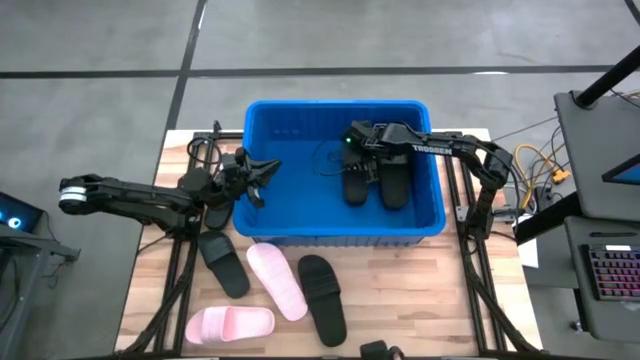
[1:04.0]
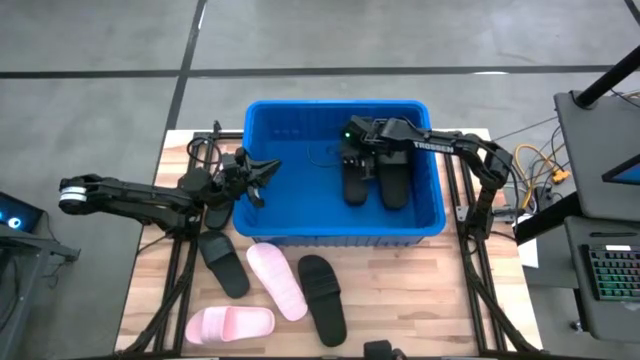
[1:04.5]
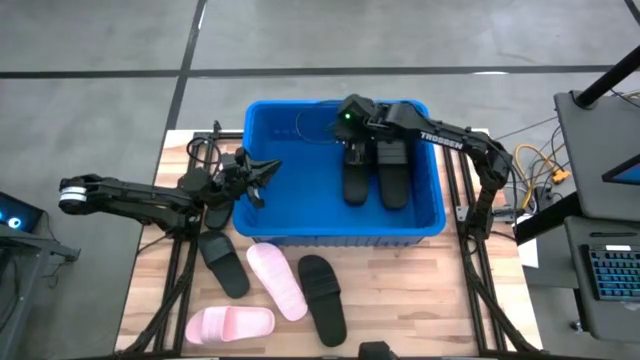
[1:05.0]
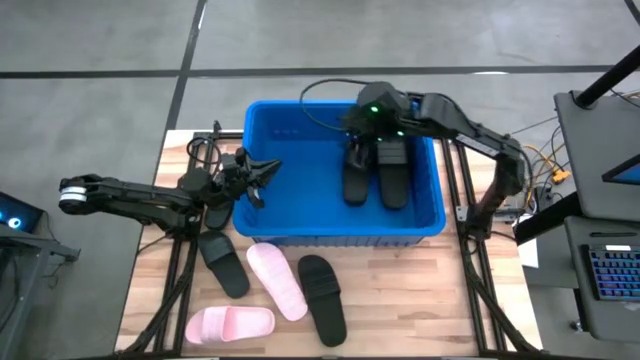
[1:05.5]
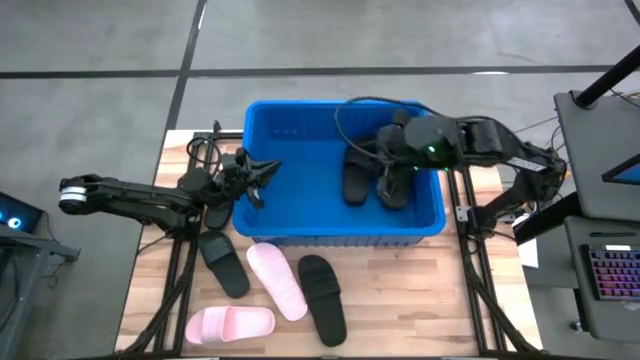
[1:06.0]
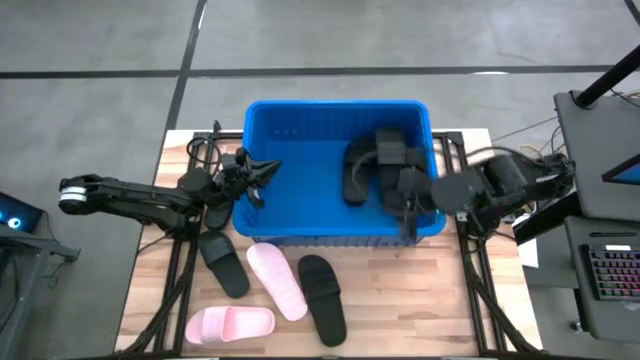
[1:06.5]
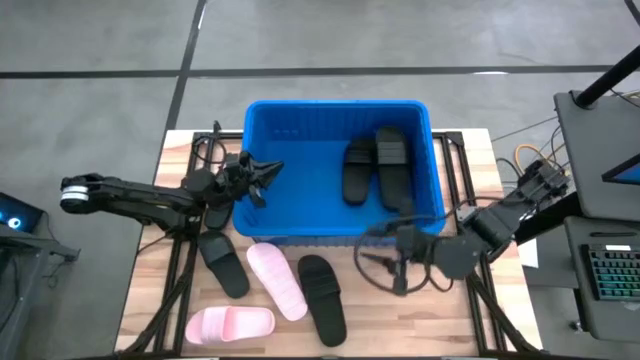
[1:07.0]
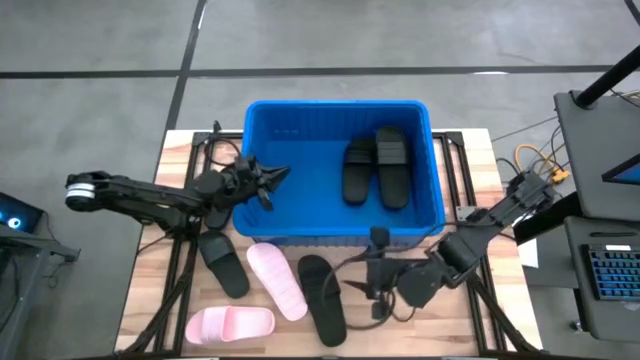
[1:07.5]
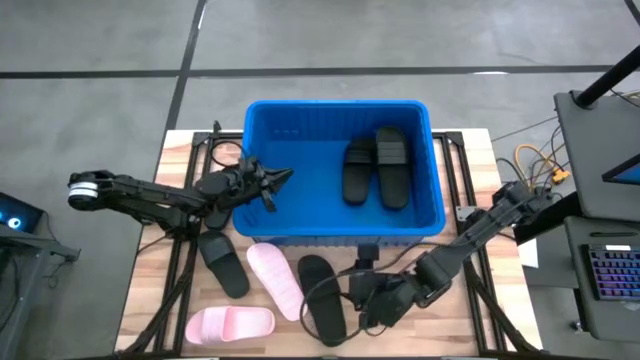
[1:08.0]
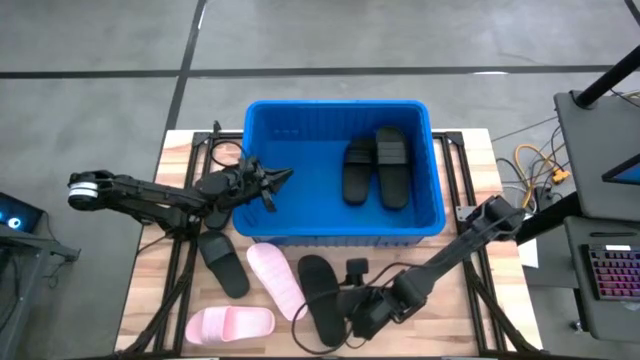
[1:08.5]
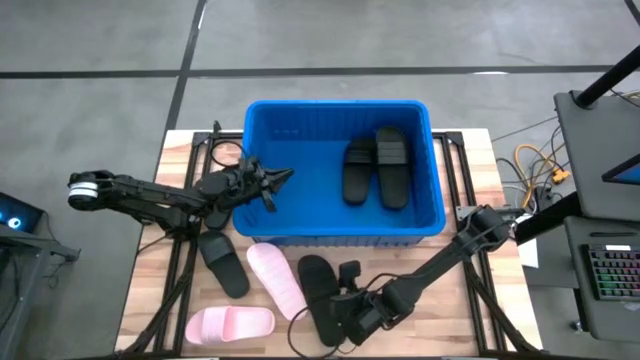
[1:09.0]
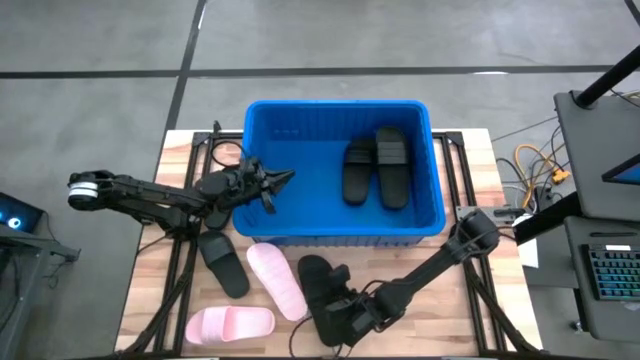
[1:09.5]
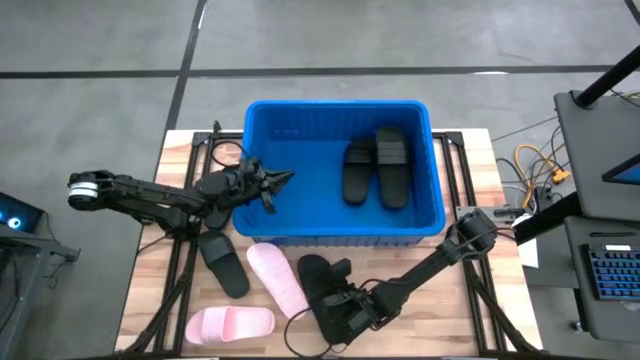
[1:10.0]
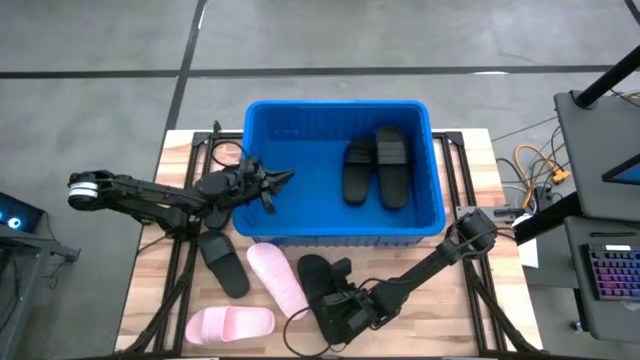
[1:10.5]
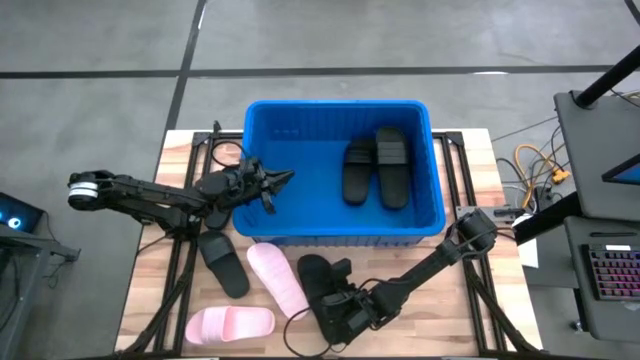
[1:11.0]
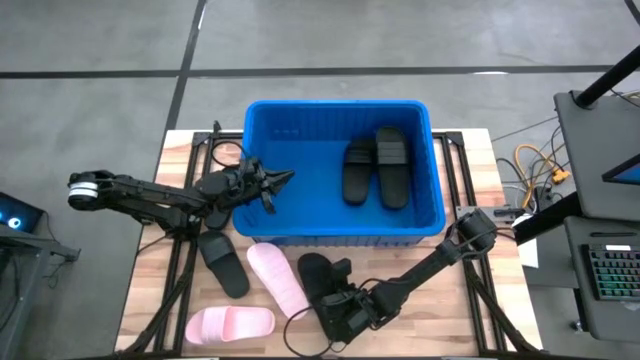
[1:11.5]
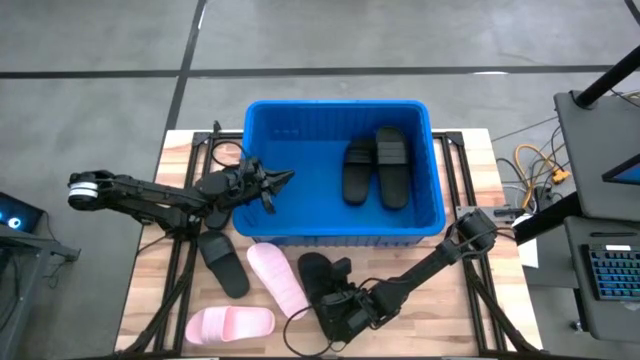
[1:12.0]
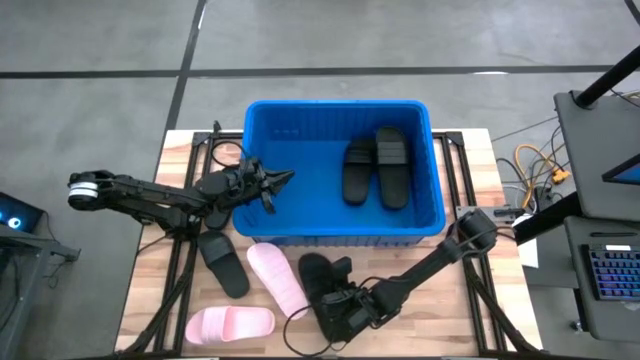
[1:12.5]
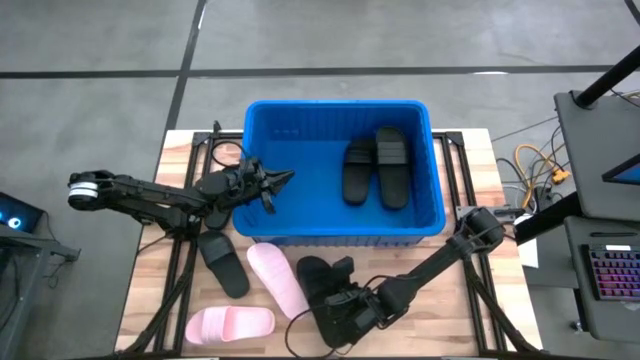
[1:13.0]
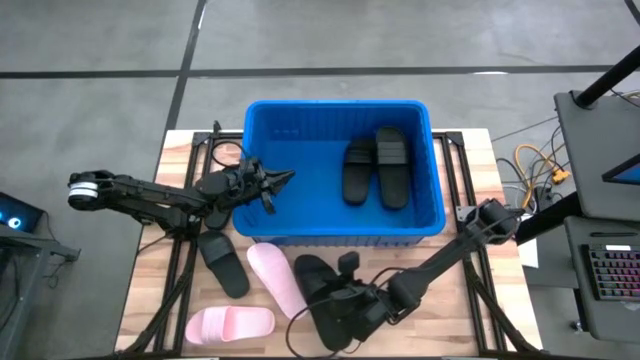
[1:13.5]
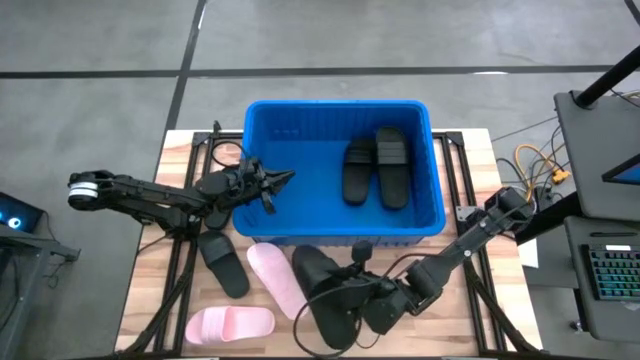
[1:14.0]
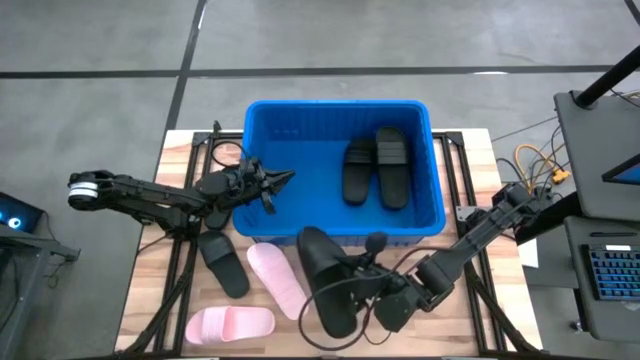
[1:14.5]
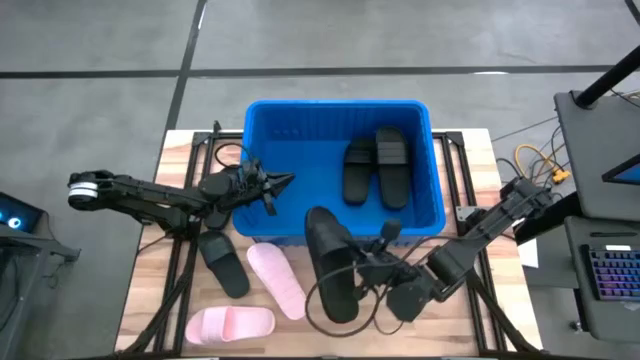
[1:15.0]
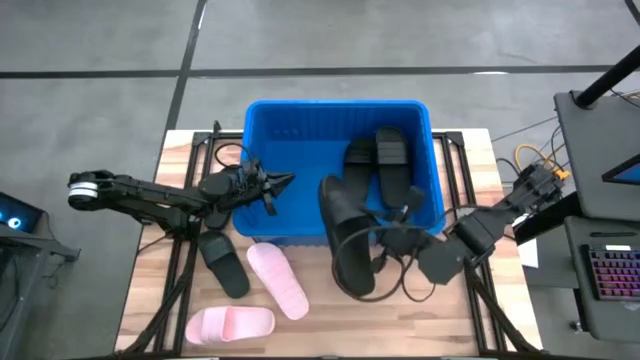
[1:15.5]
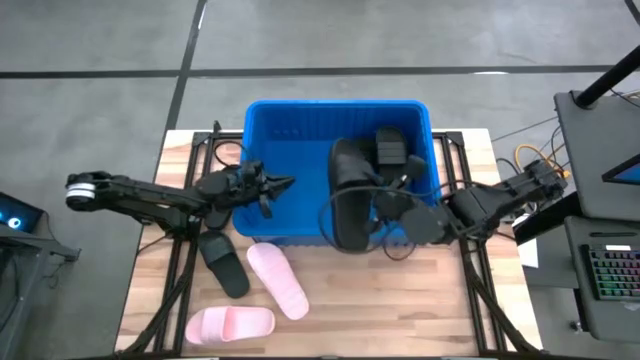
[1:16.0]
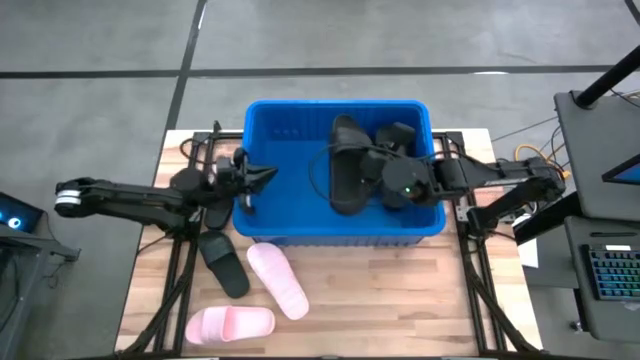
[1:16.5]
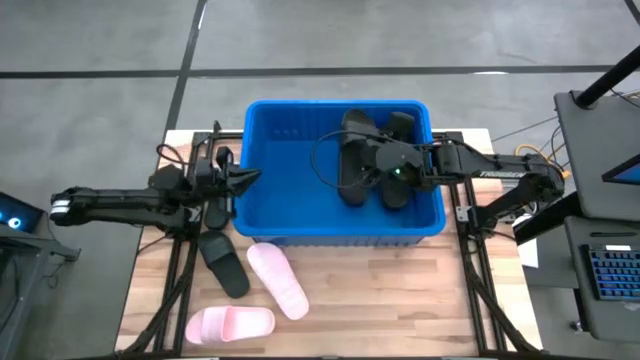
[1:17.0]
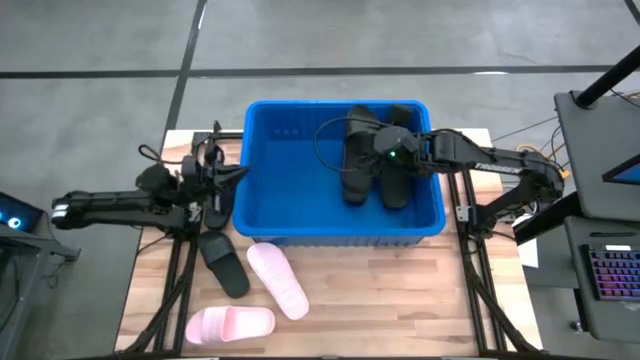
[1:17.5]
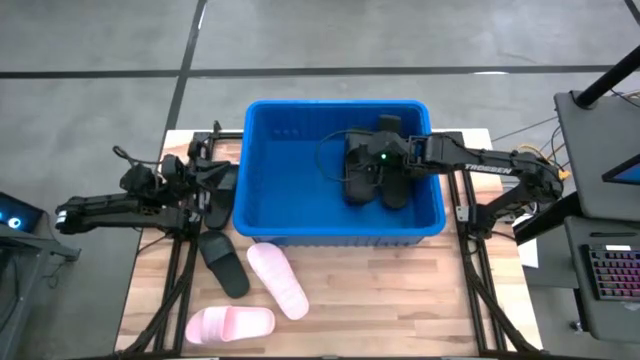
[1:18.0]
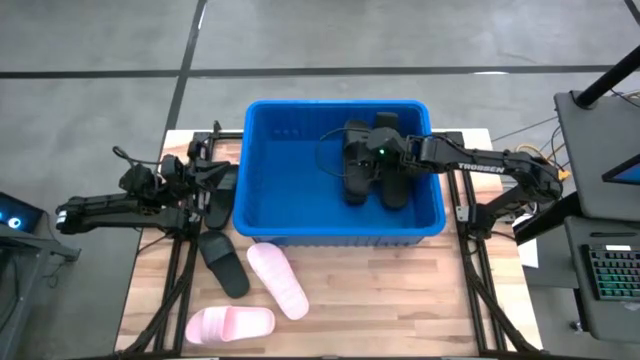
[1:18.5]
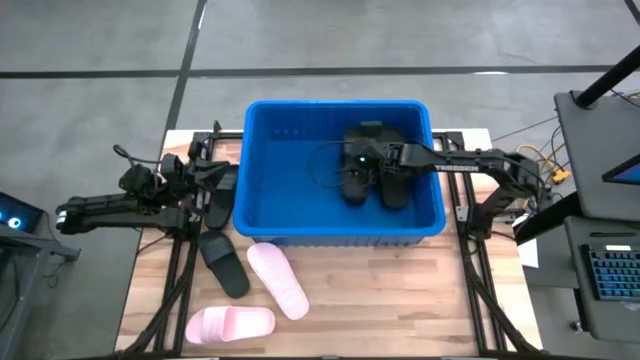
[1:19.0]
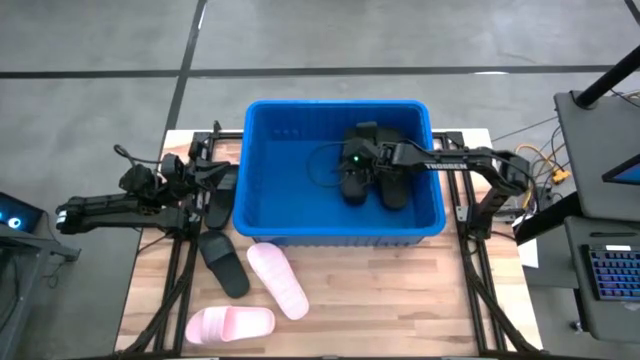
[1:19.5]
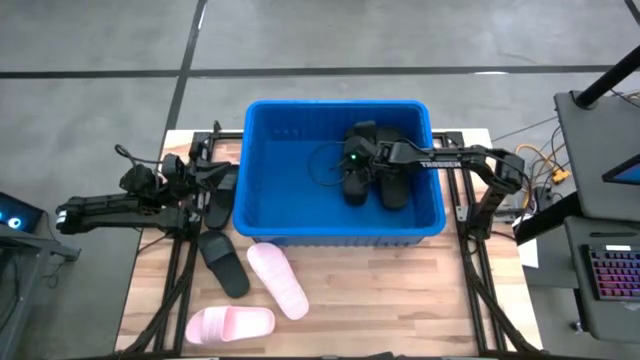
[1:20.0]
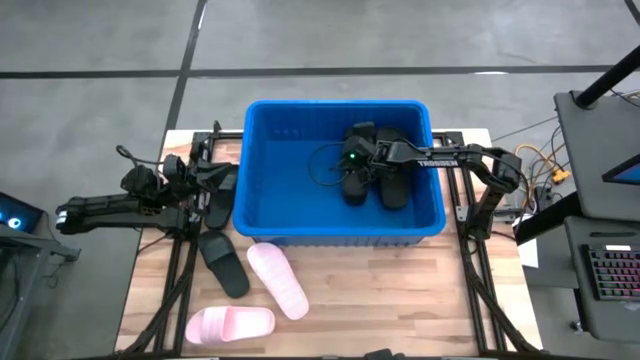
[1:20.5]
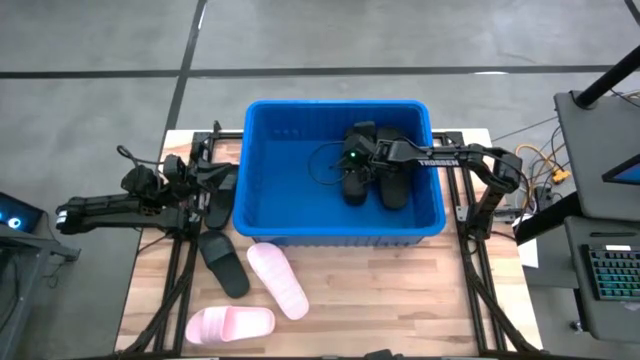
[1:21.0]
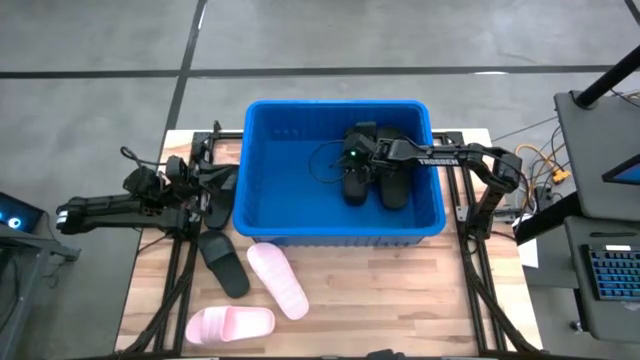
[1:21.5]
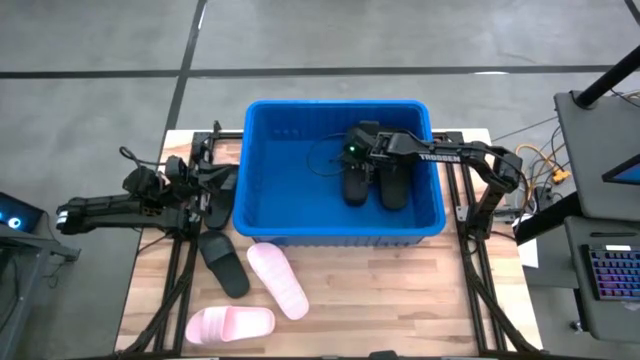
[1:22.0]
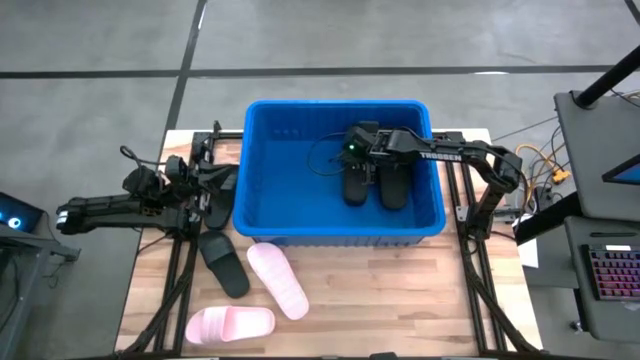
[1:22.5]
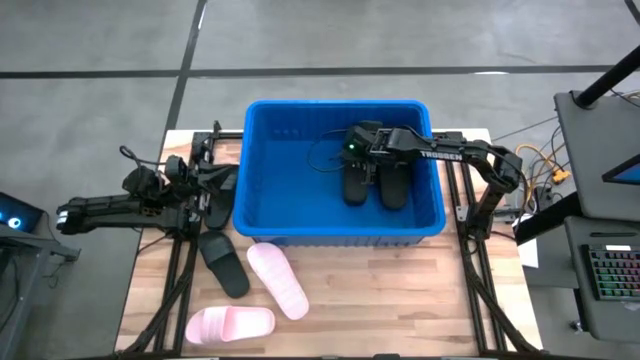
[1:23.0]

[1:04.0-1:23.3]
Task: Pick and place slides into bin
Put the black slide into the blue bin

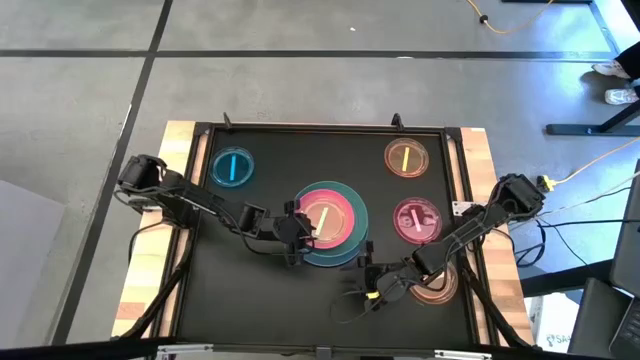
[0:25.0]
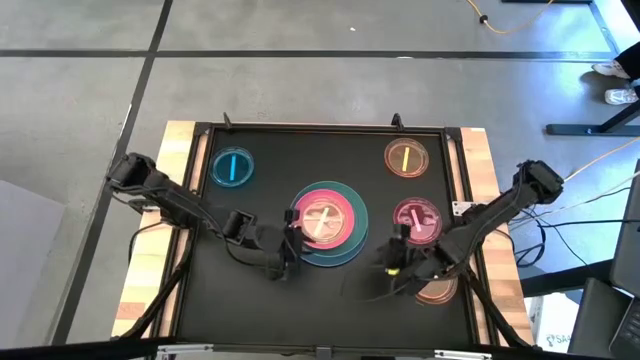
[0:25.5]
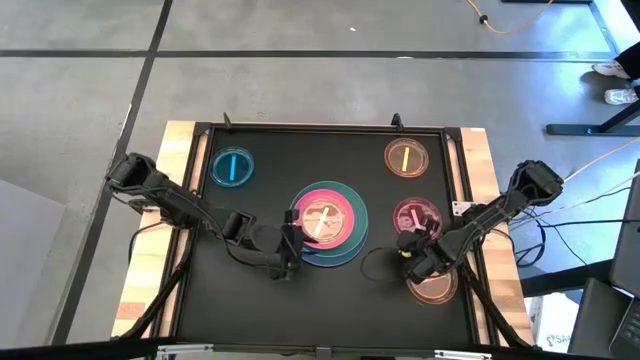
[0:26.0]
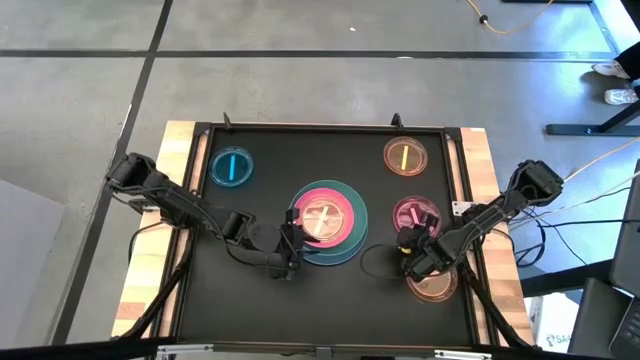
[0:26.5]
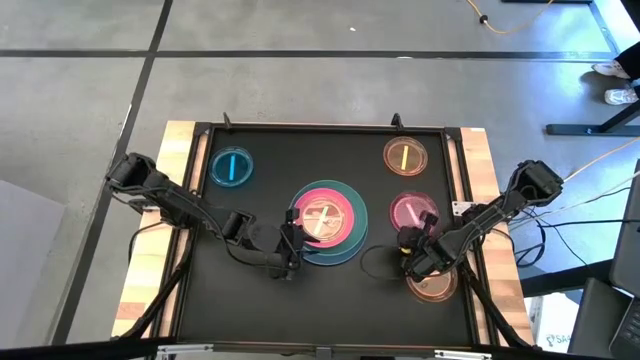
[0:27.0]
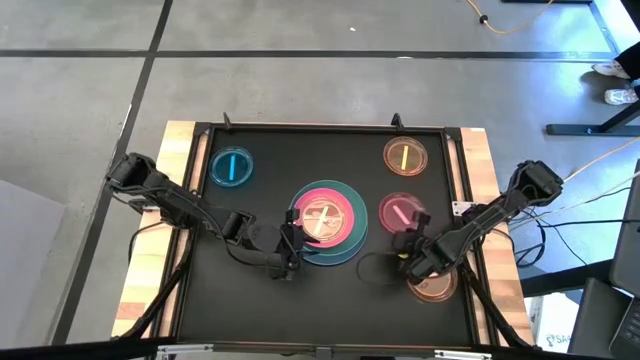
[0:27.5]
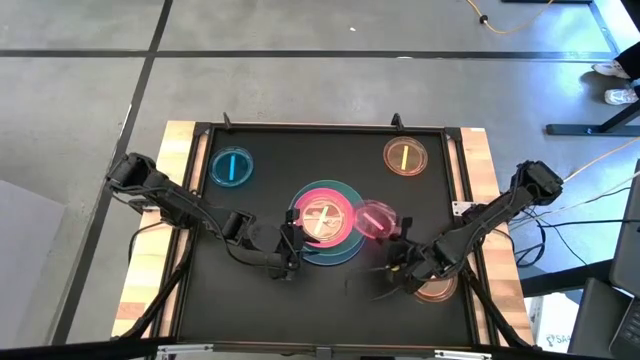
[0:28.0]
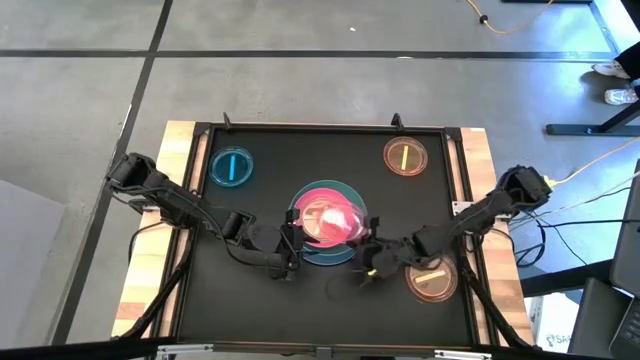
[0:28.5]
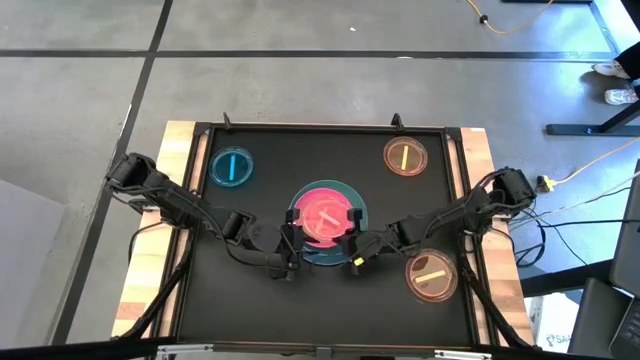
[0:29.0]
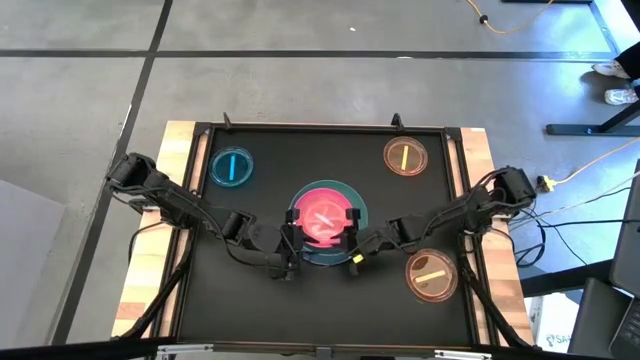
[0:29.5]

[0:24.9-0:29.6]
Task: Stack plastic plates
Stack the light pink plate on the light green plate
